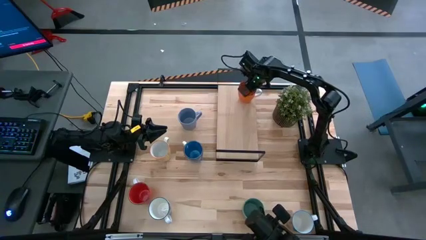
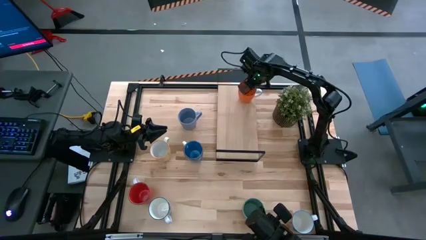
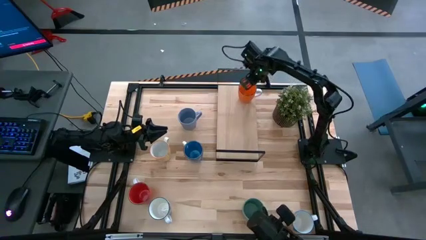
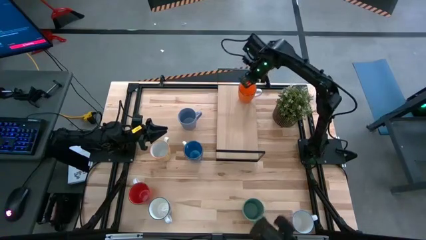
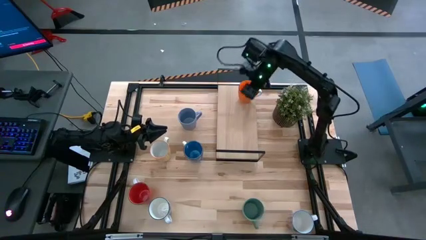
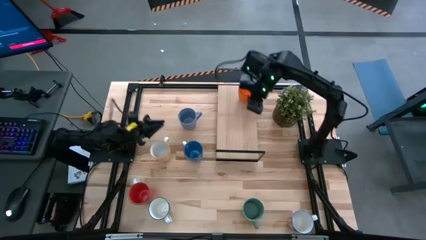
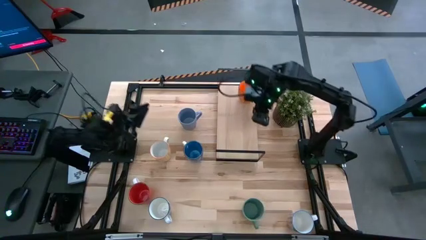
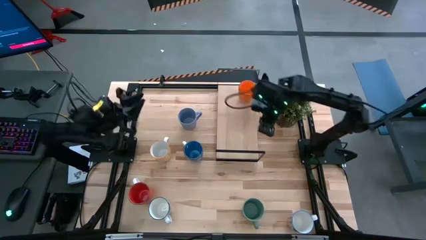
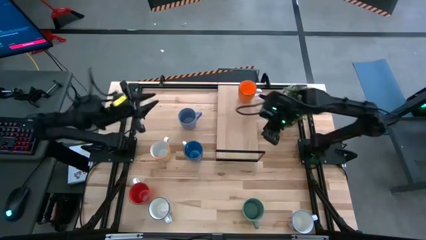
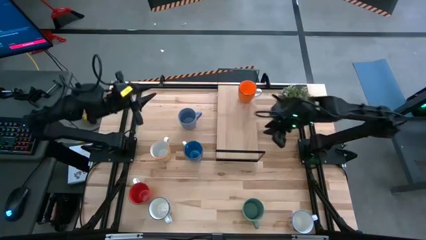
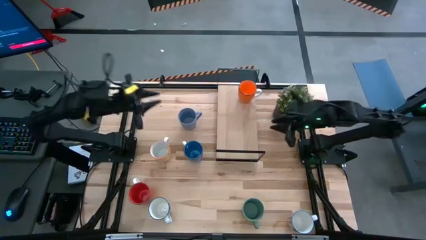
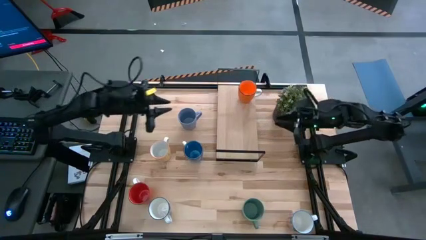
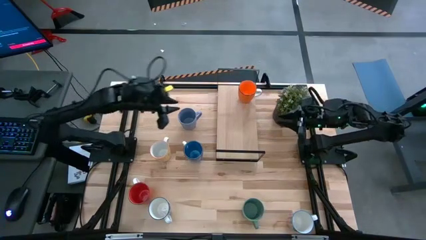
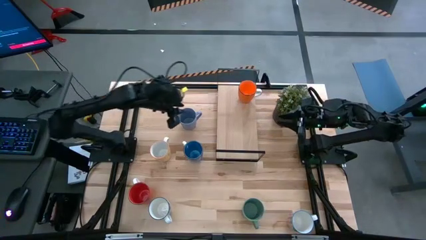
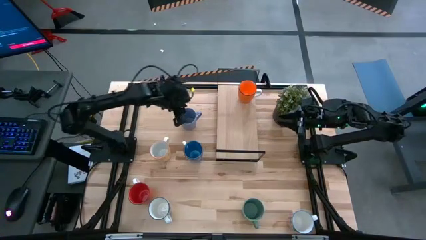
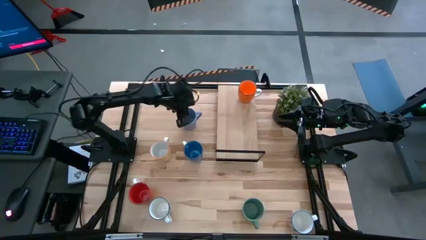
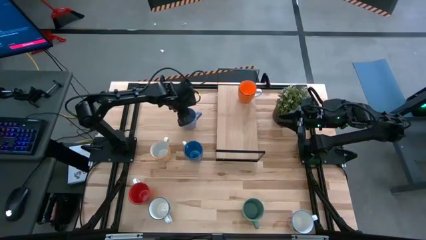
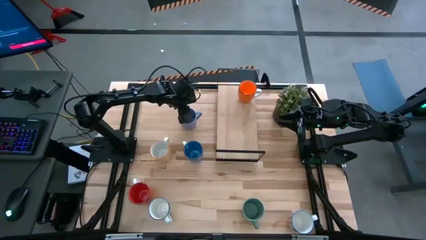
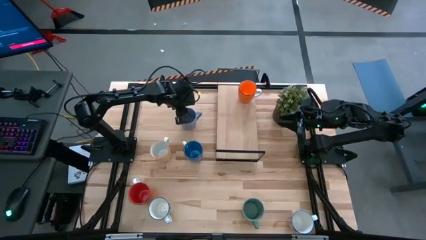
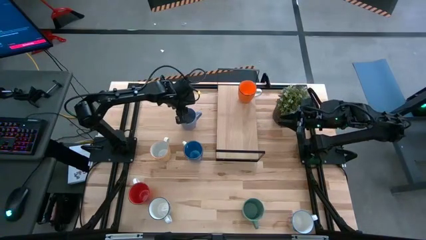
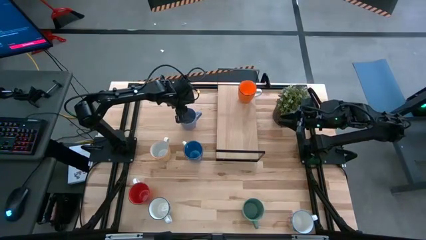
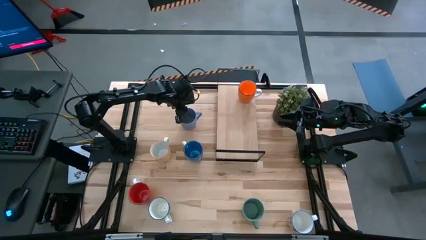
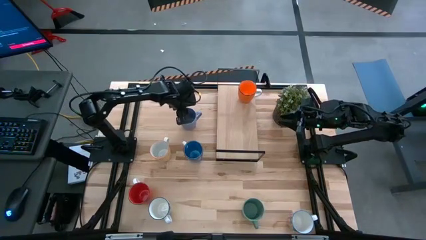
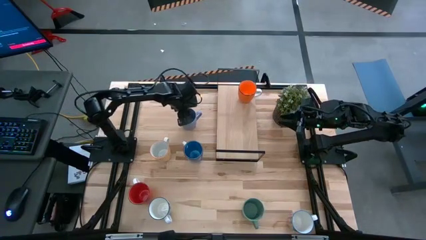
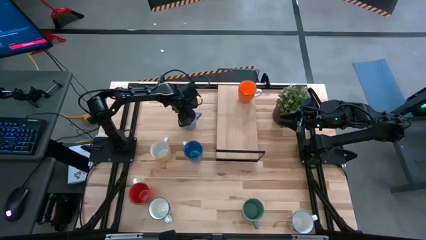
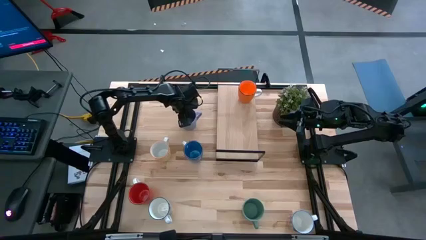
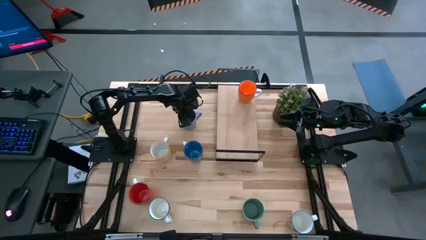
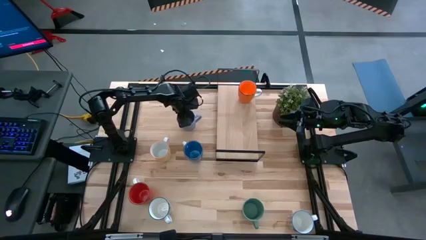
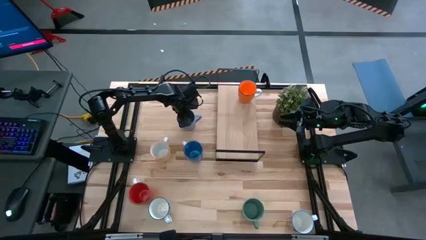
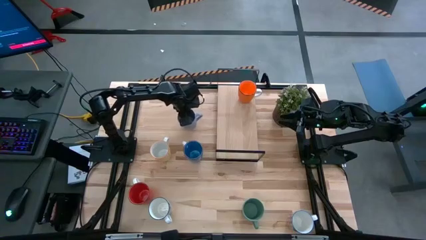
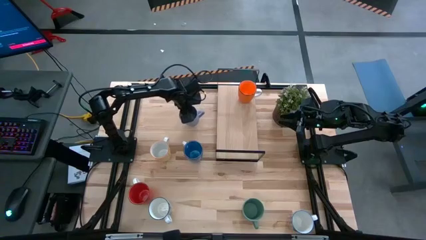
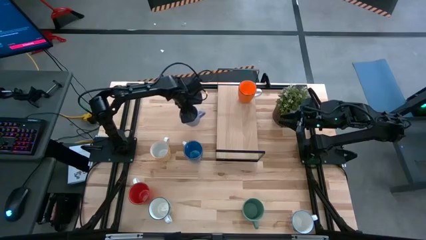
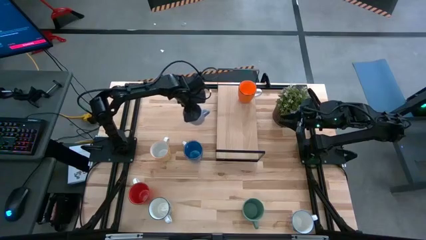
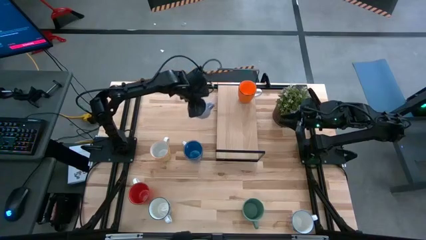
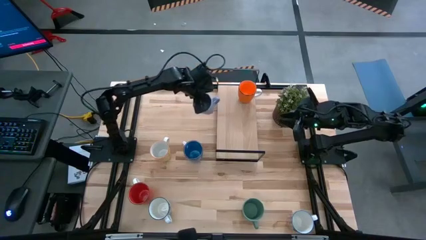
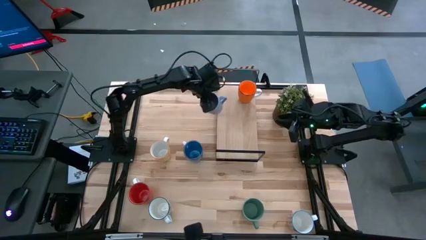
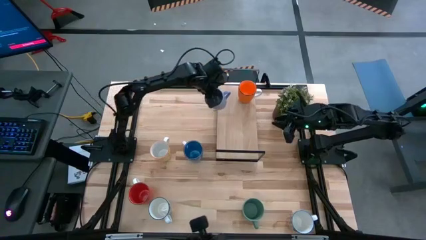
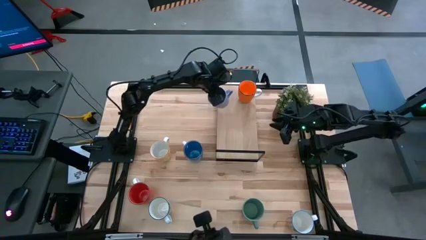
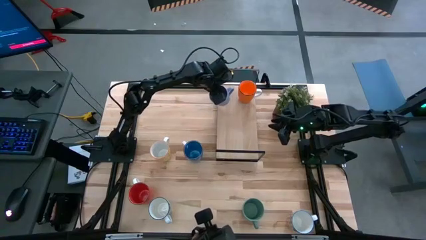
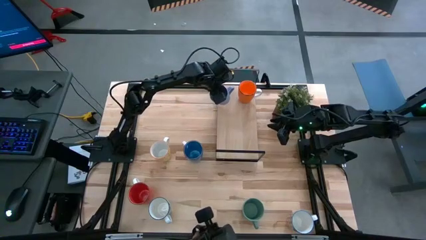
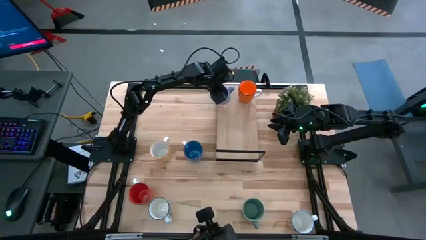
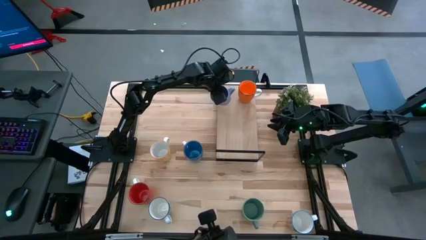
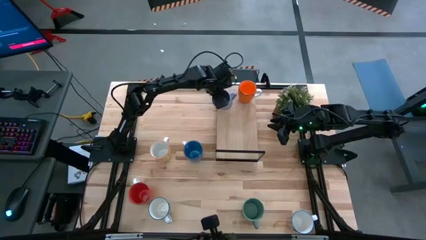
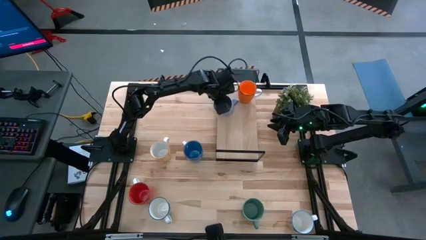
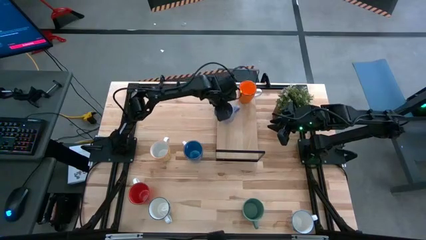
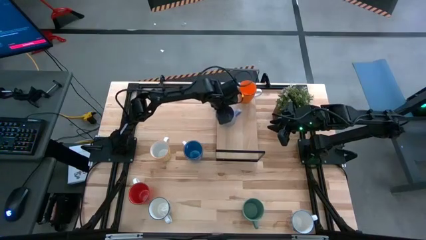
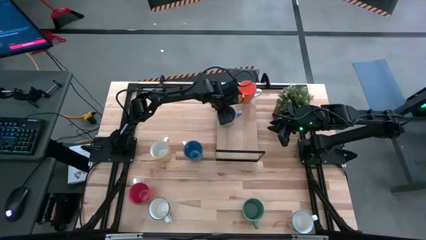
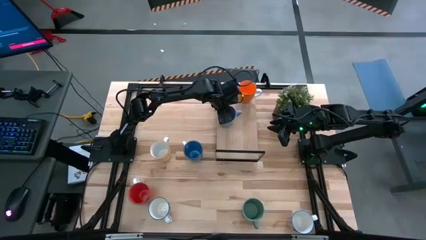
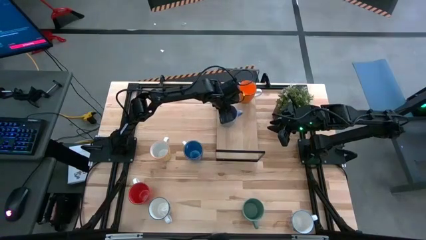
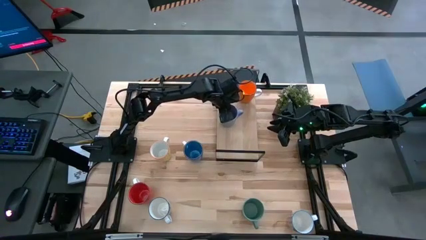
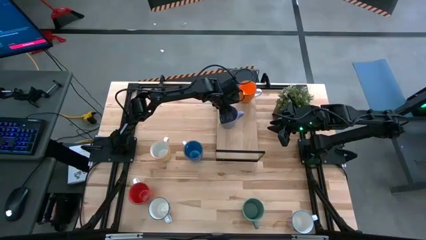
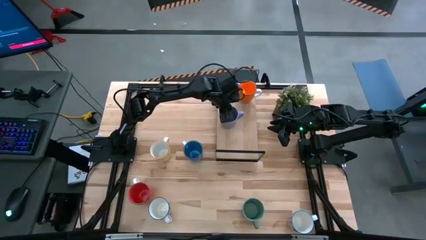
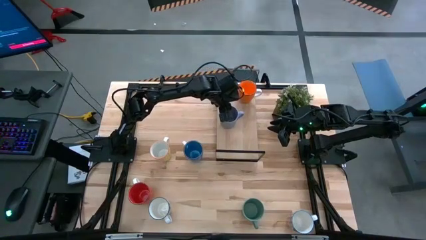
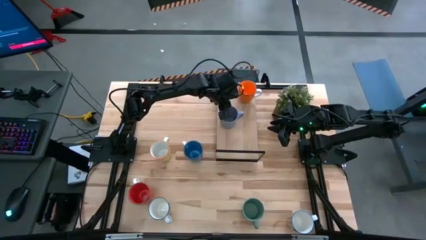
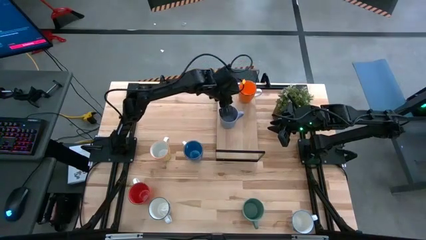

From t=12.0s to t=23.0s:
Task: Place coffee mugs
Put the light blue mug on the shelf to the left side of the orange mug
